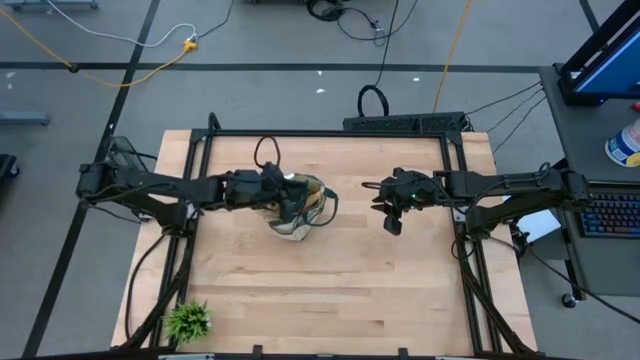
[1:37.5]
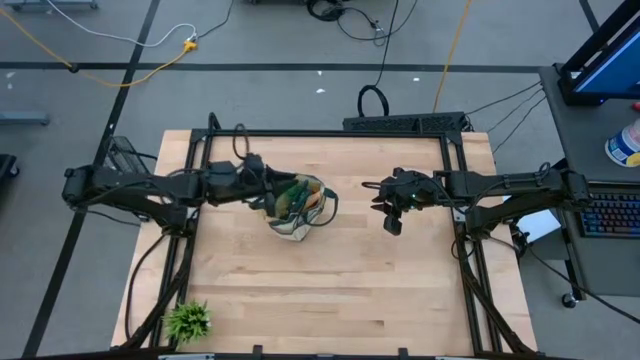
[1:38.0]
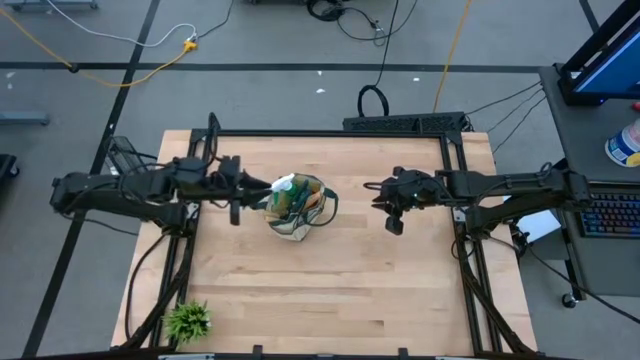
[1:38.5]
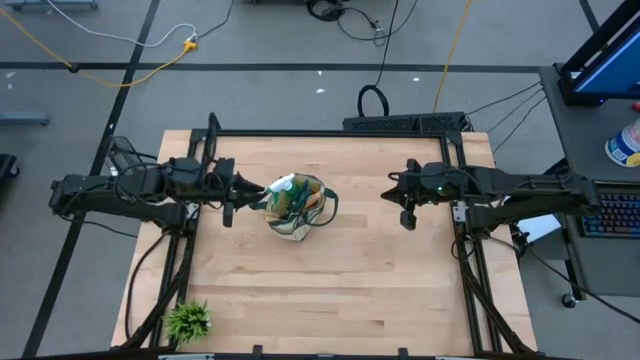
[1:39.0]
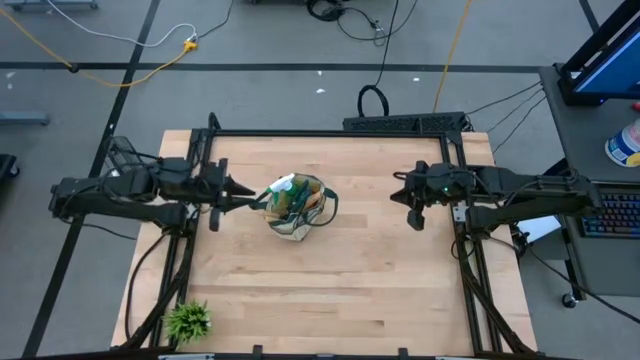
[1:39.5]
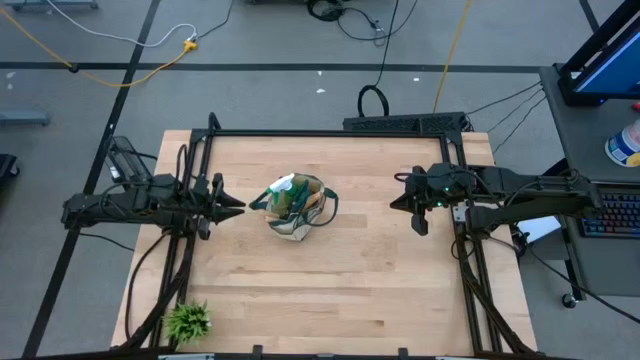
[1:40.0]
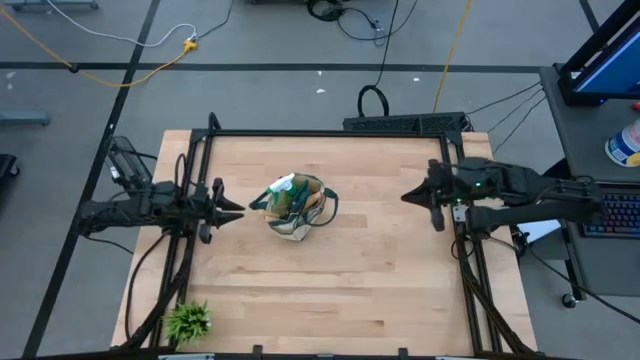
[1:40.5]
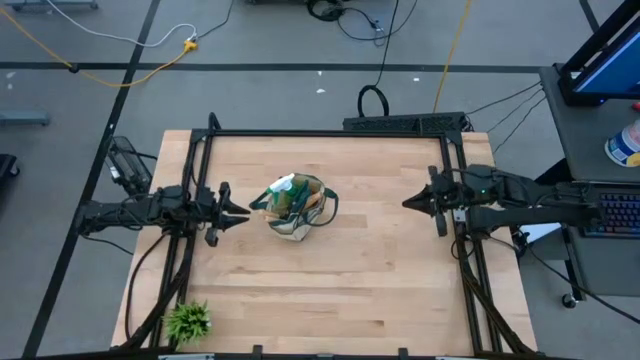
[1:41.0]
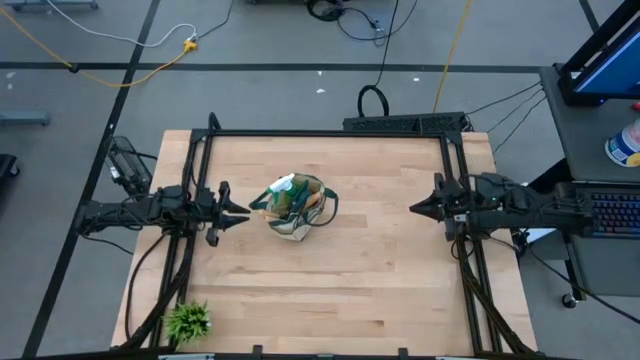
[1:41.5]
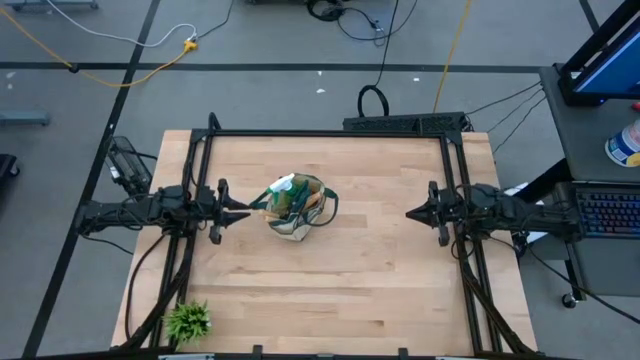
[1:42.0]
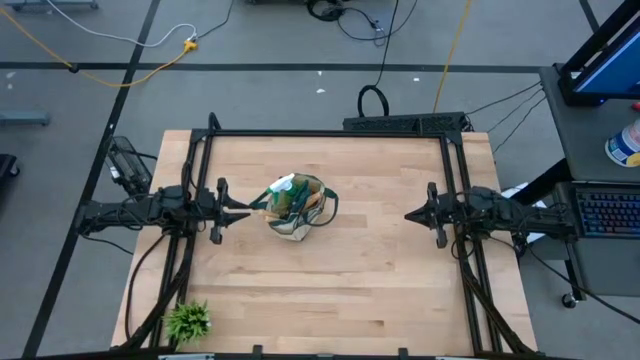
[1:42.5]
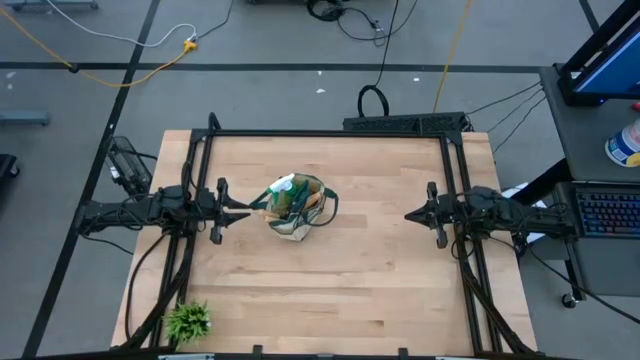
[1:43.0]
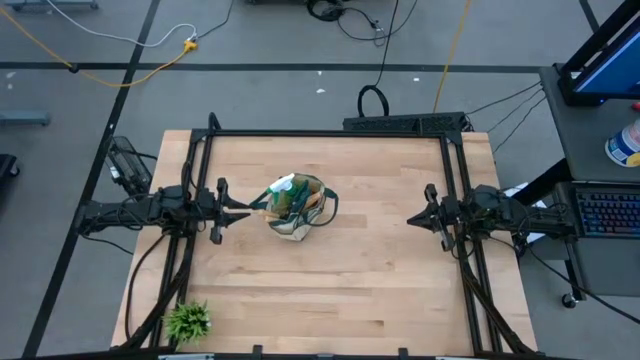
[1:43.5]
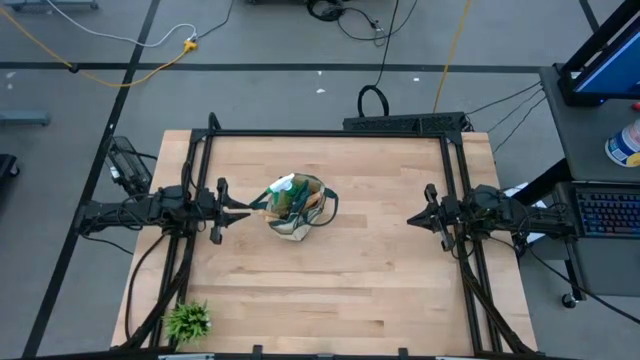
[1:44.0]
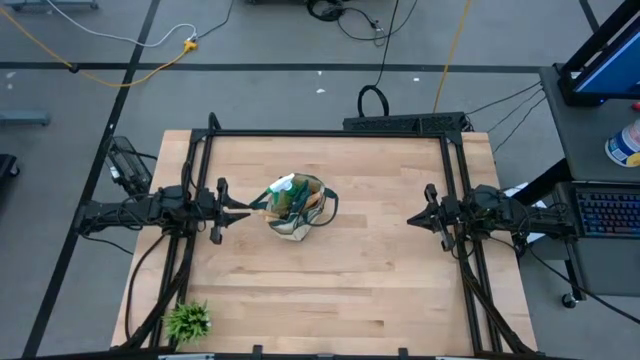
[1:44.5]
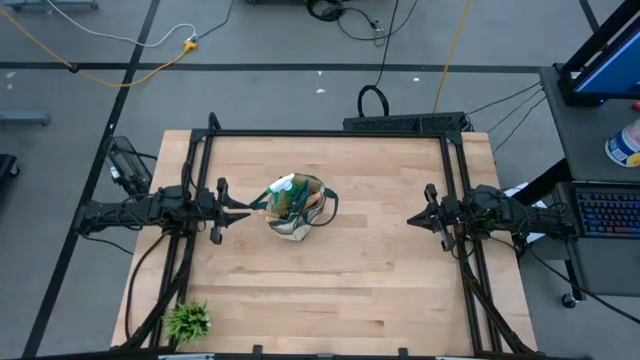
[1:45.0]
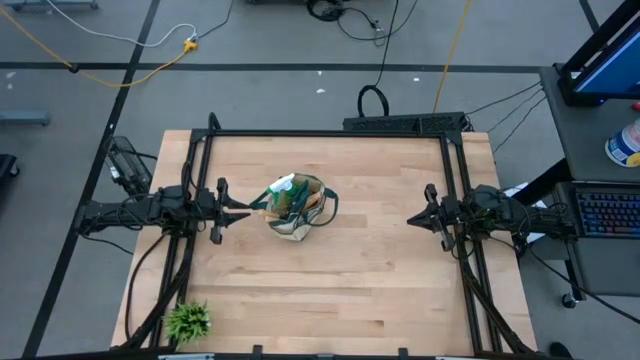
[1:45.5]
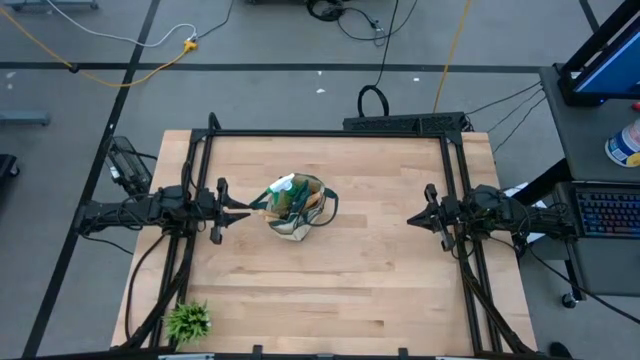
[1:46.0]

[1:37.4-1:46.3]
Task: Pick & Place Garden tools in Gardening bag
Return to Home Position

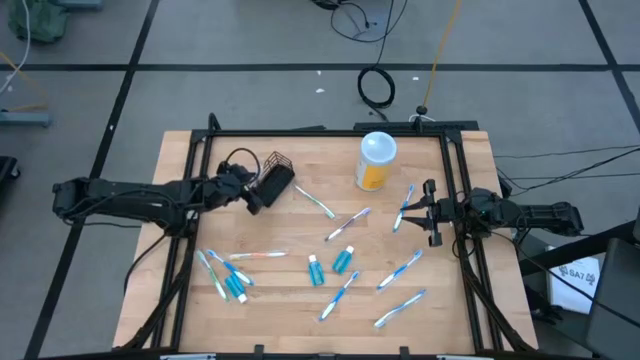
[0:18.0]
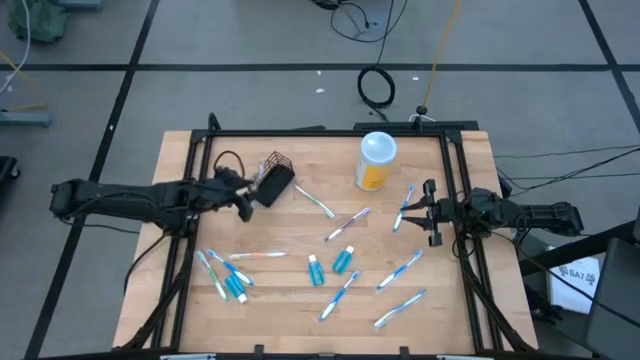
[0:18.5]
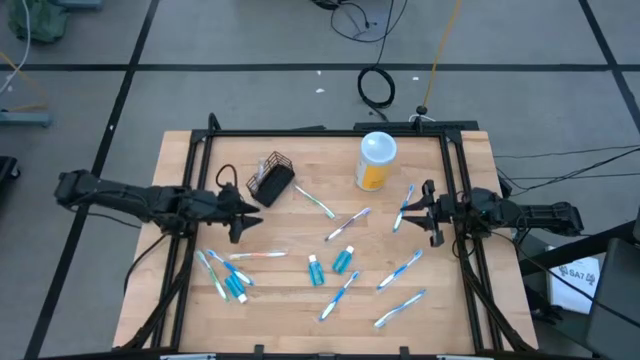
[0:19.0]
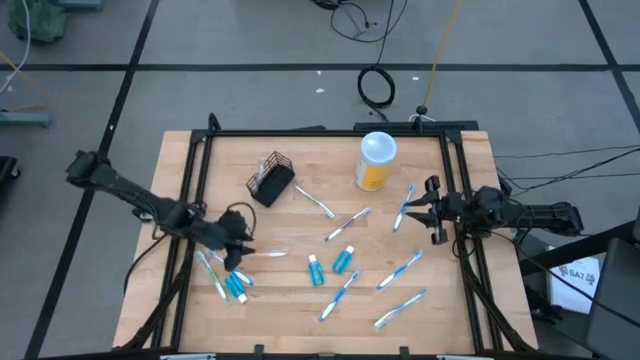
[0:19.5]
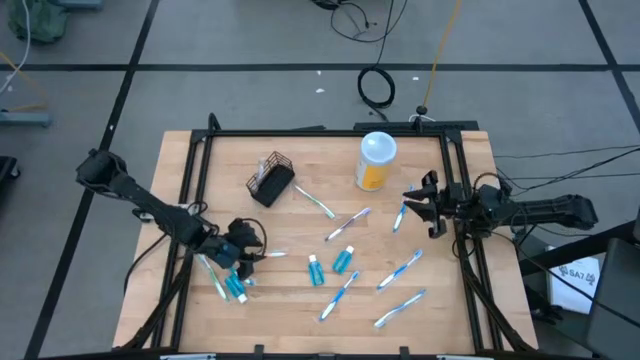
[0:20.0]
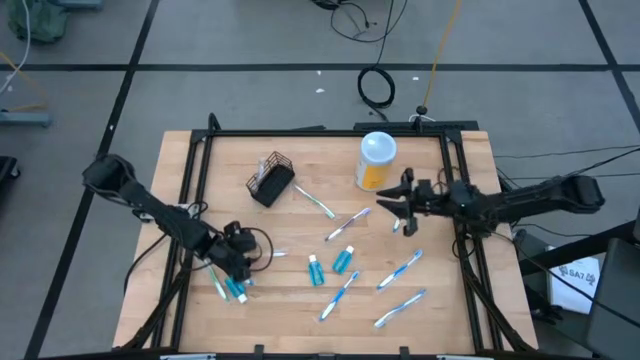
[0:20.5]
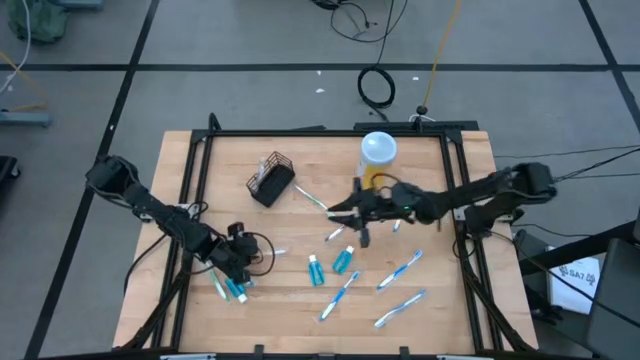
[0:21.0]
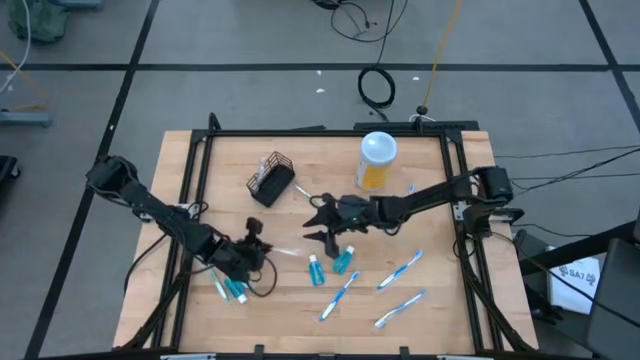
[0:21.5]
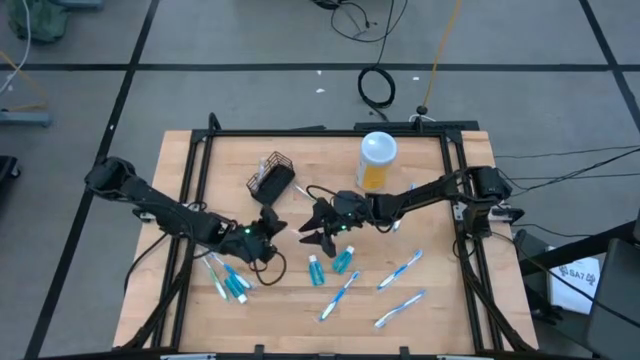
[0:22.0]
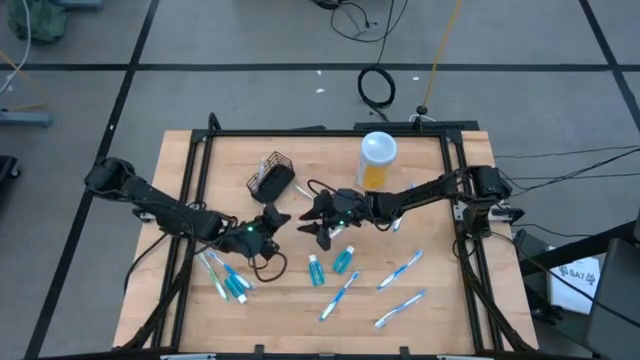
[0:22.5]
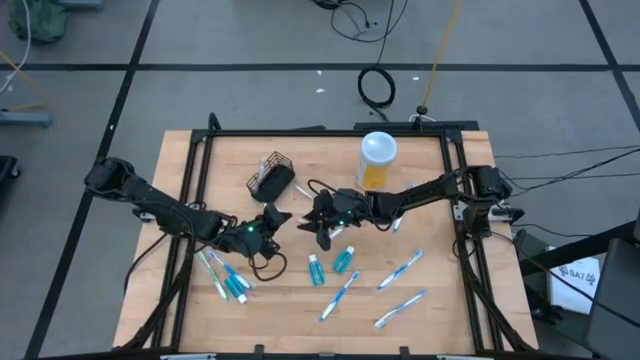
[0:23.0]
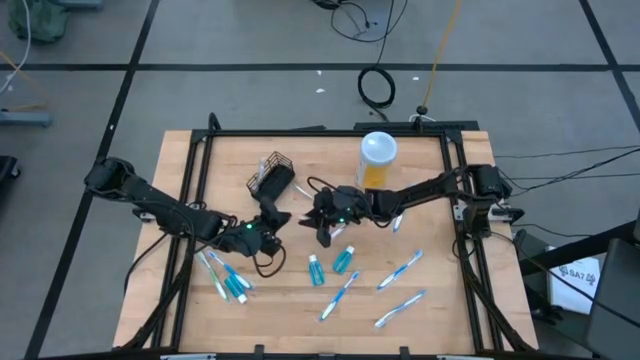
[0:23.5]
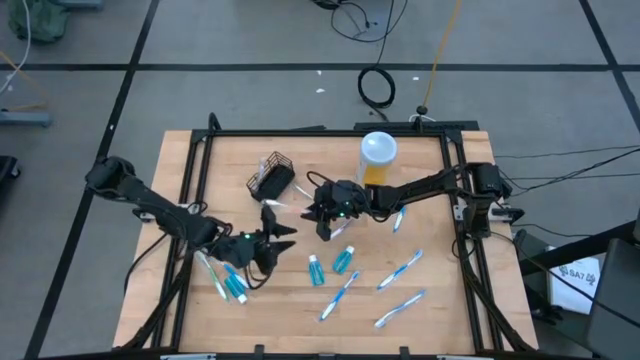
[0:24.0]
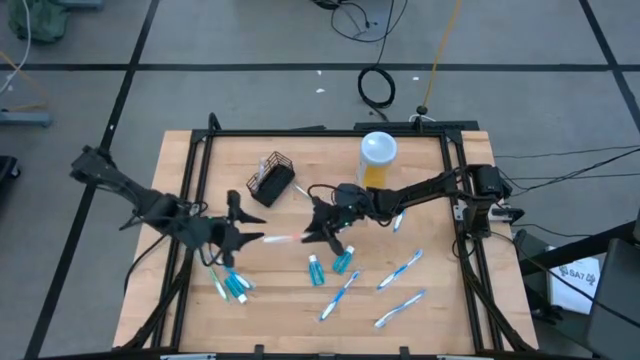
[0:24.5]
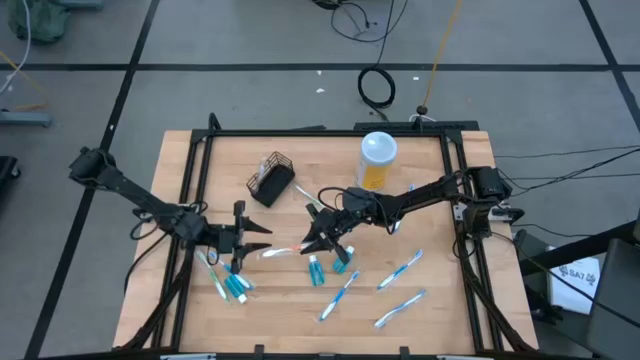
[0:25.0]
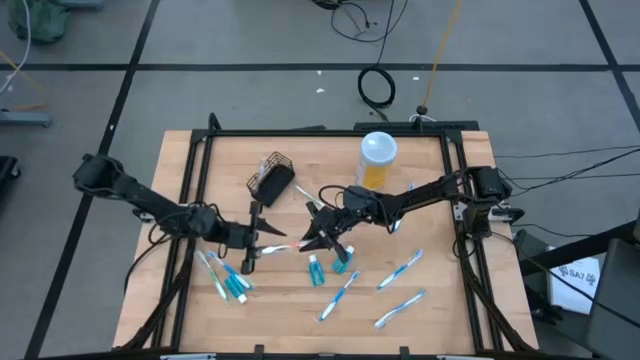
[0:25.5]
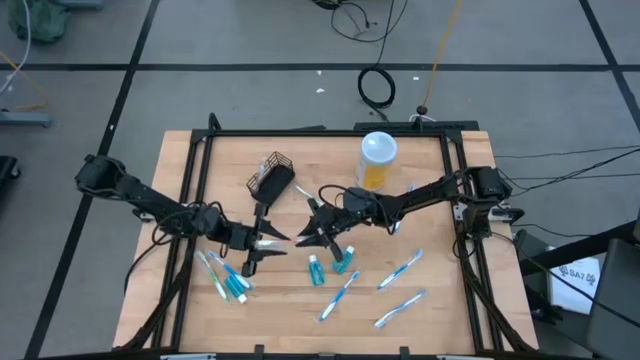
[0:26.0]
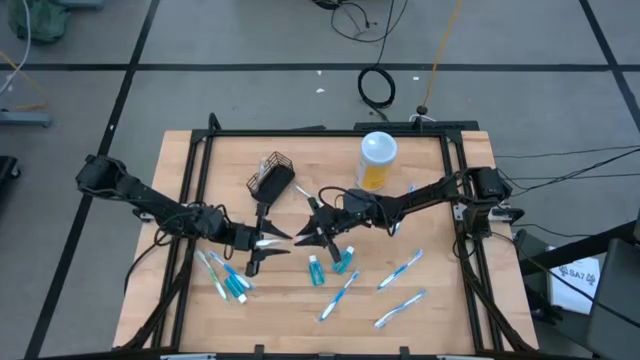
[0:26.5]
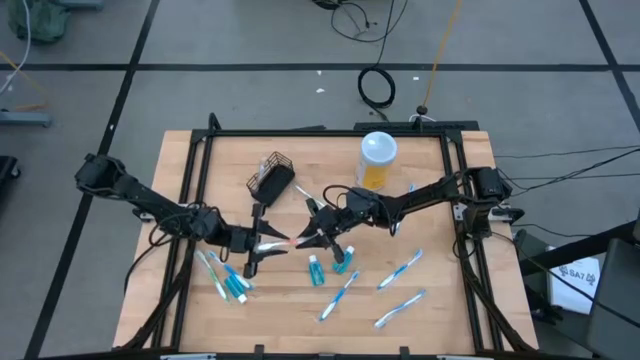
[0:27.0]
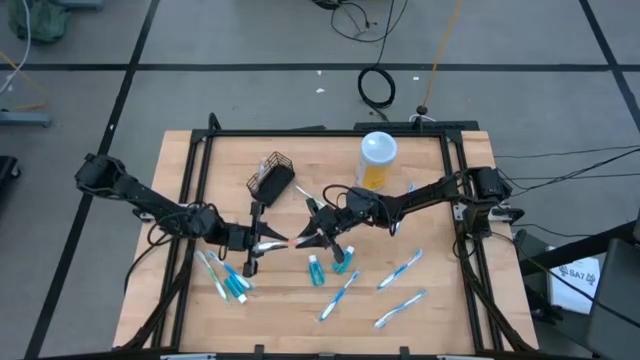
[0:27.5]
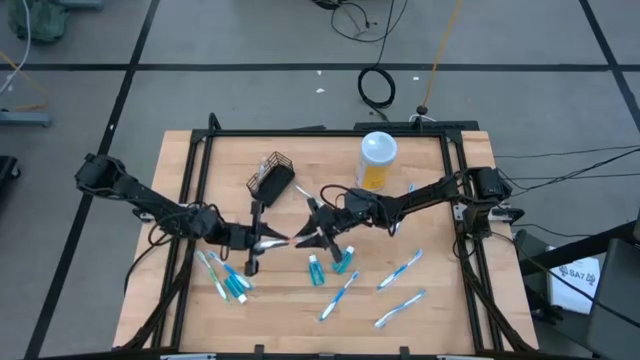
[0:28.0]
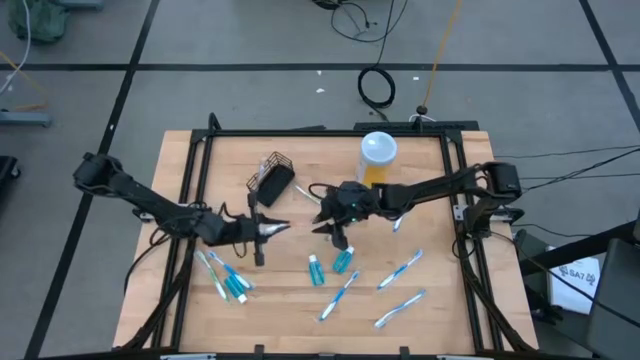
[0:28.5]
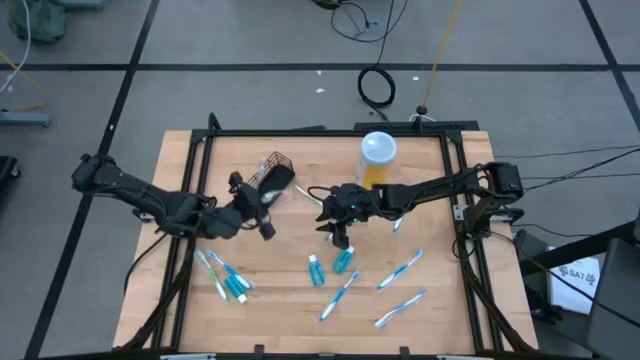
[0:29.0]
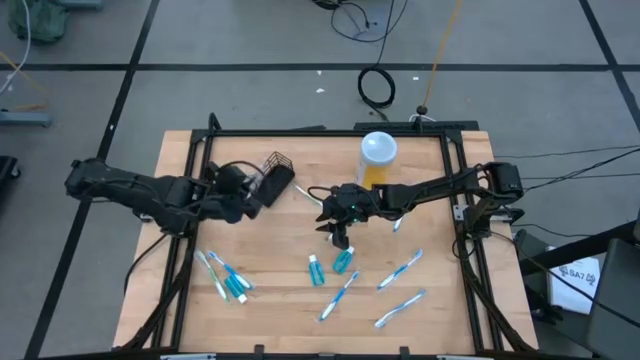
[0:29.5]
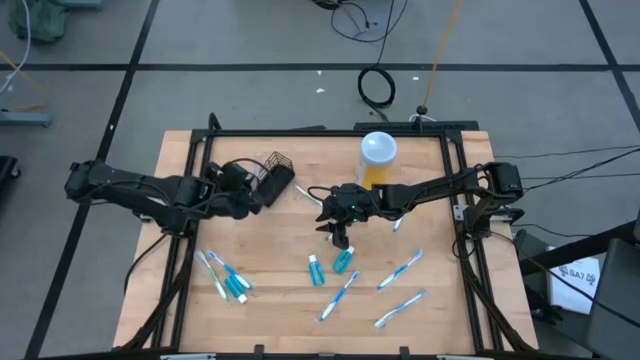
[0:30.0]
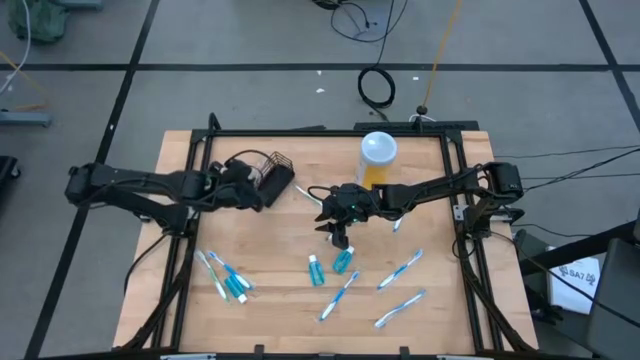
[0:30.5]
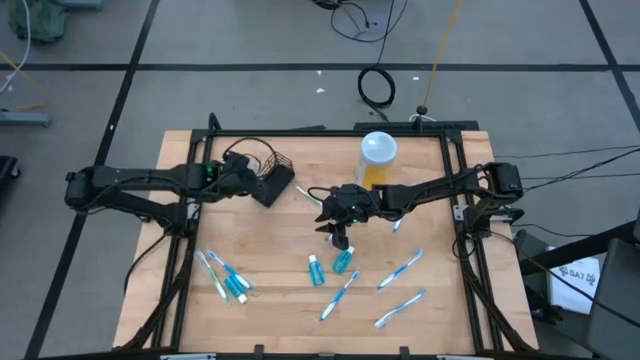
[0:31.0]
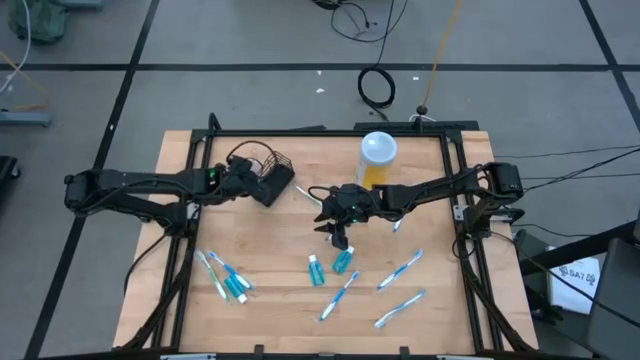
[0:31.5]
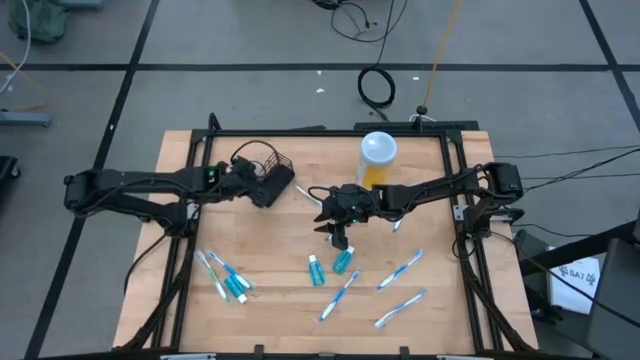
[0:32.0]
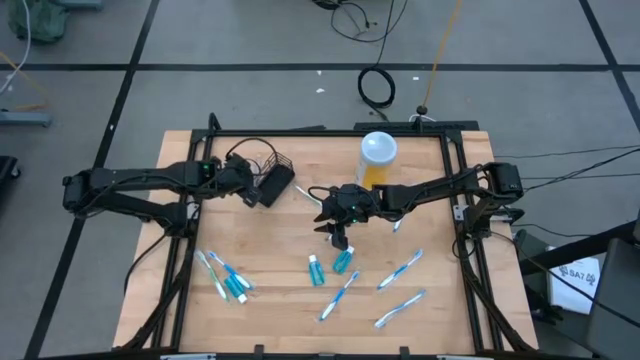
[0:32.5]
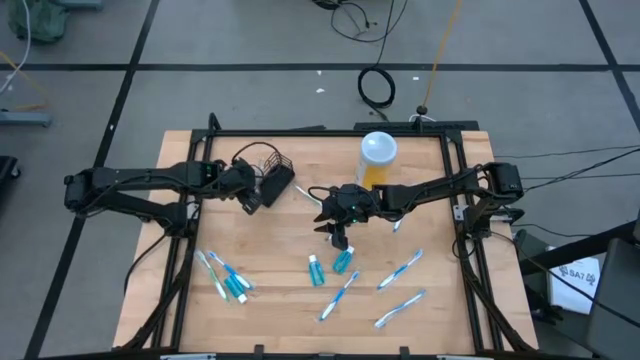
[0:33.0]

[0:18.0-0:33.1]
Task: Pick & Place toothbrushing station
Put the orange toothbrush into the black wire organizer
